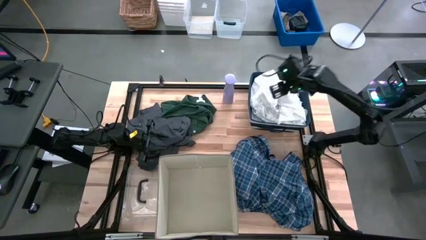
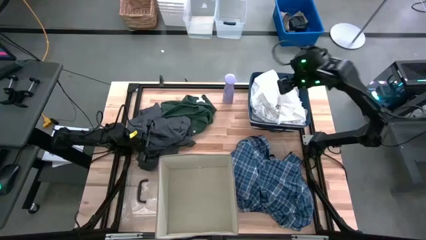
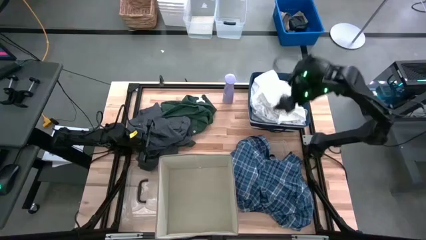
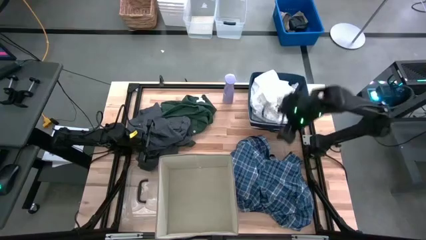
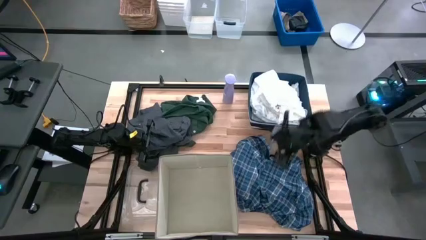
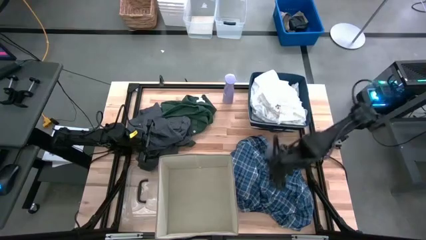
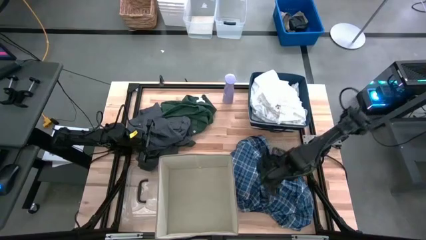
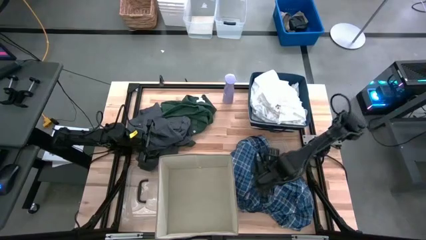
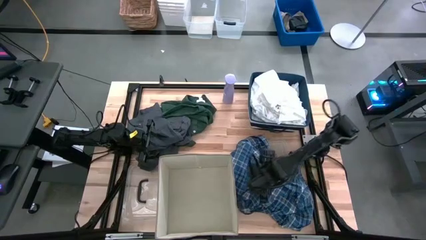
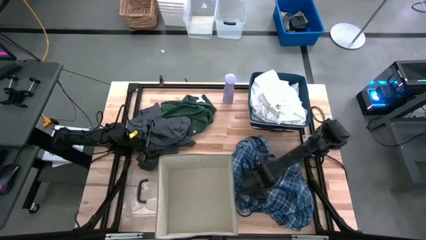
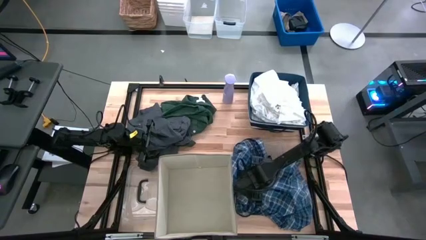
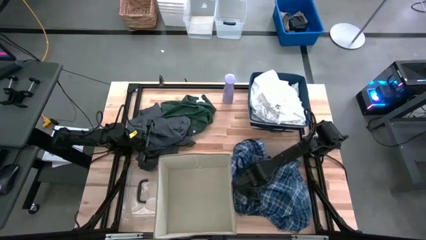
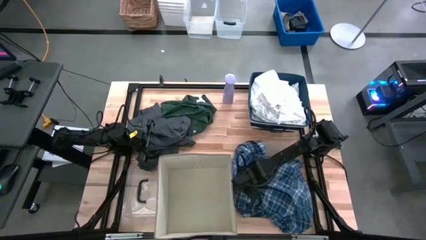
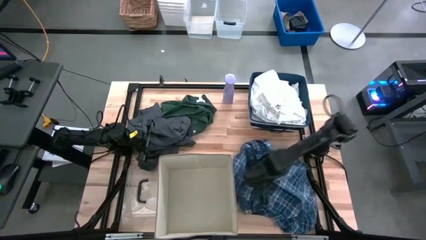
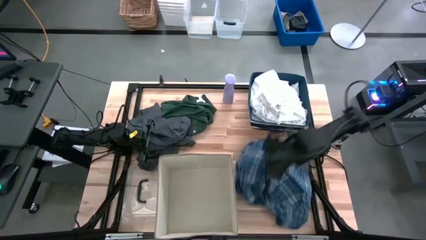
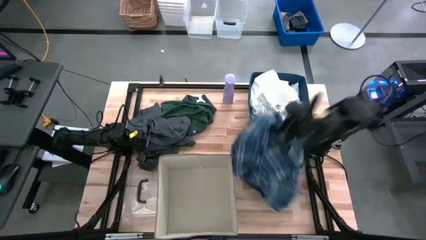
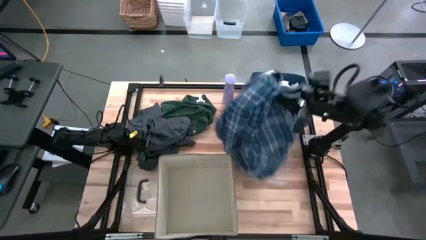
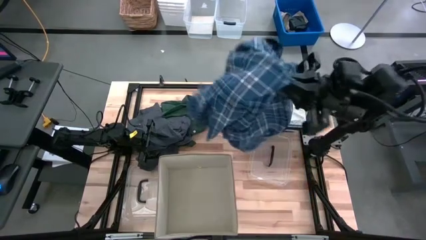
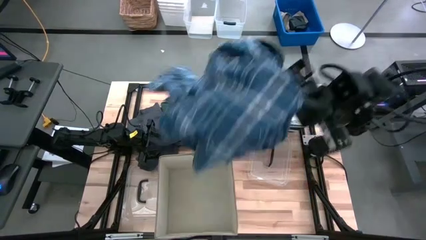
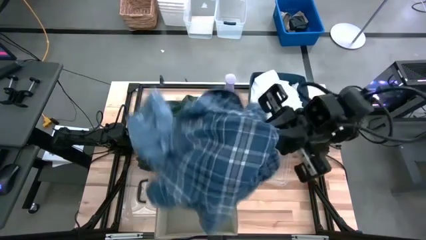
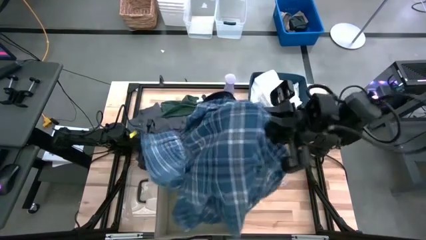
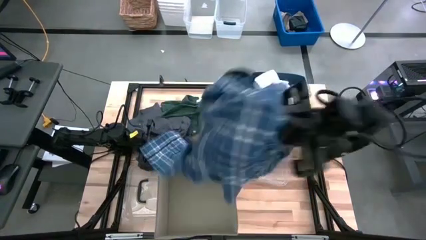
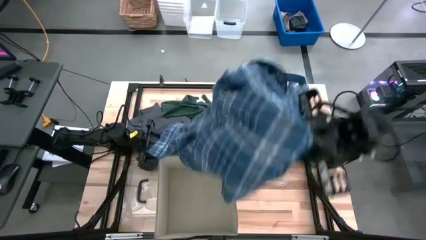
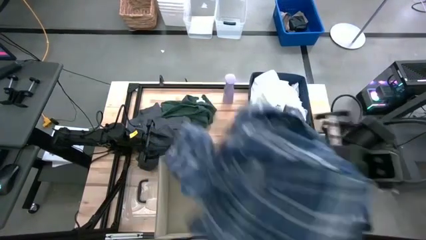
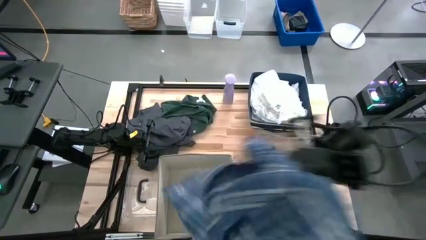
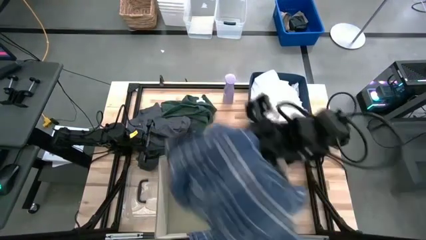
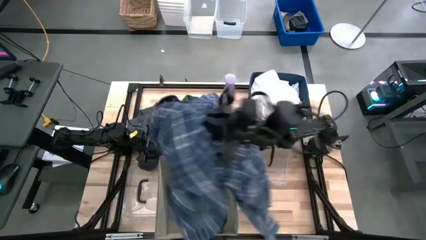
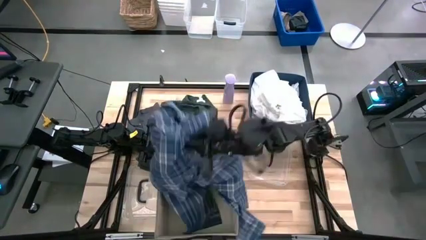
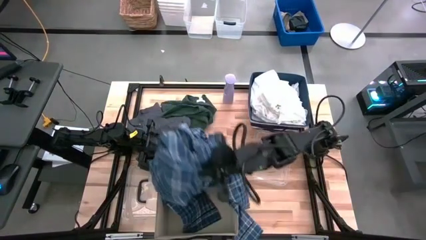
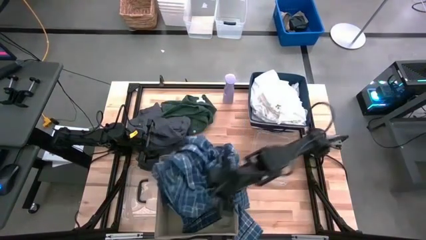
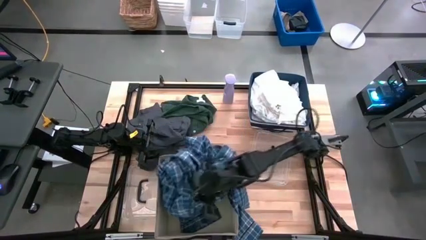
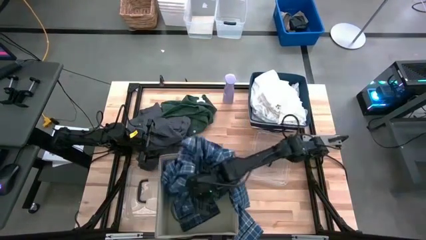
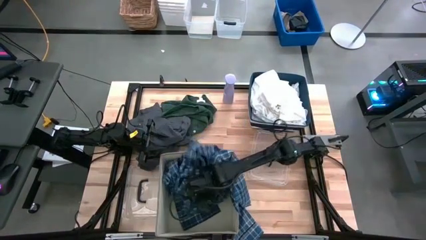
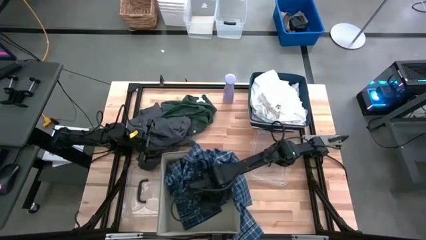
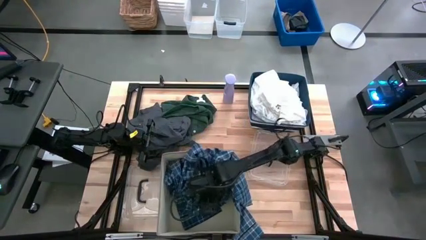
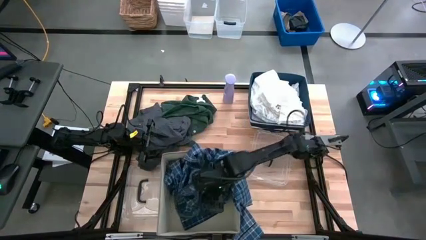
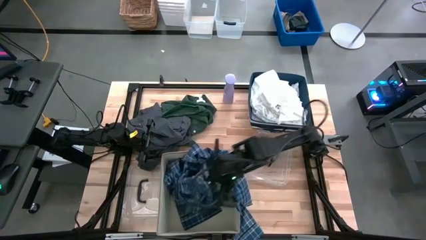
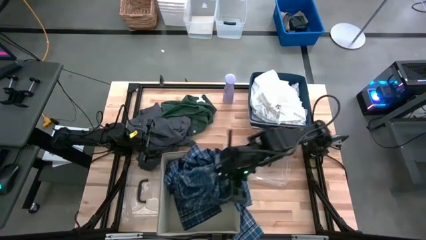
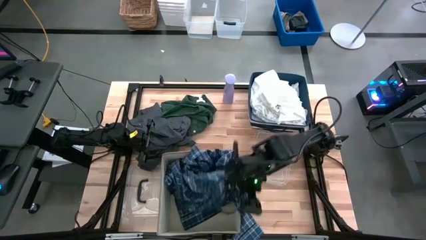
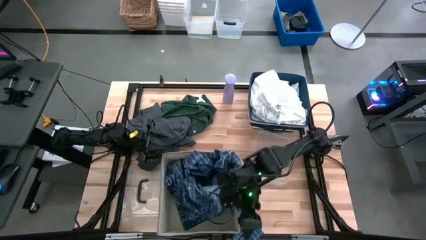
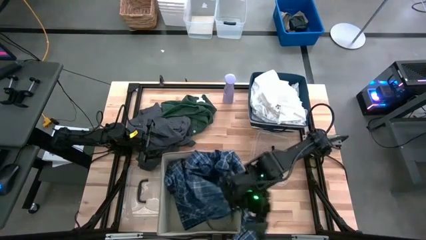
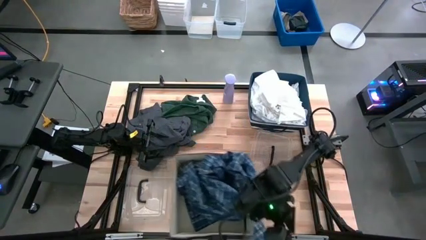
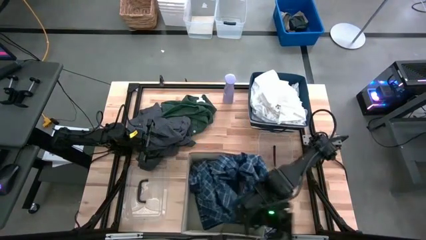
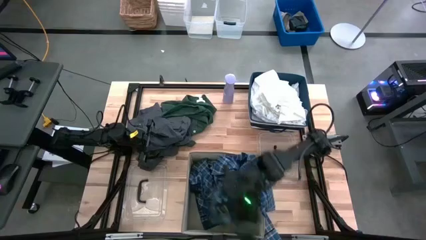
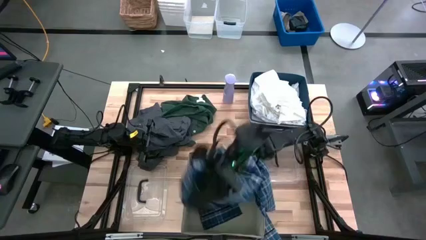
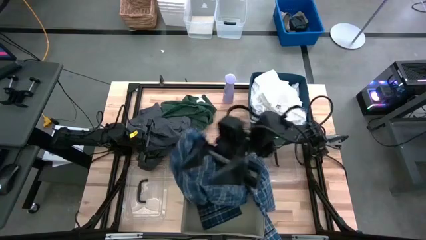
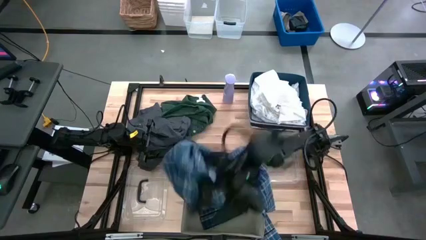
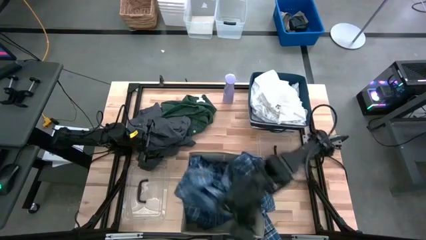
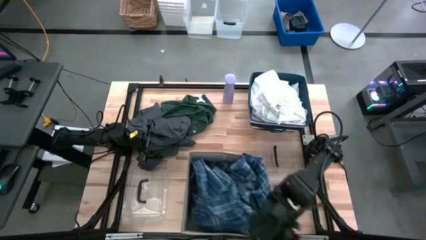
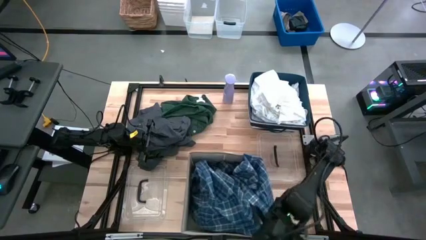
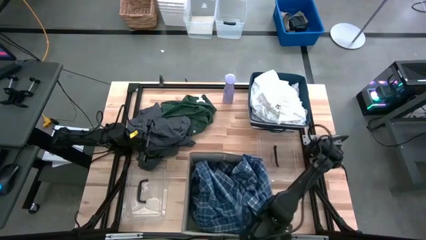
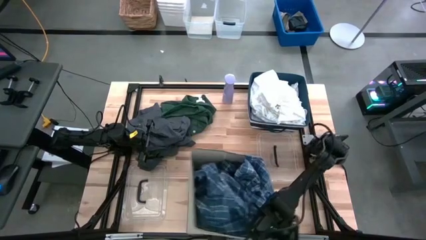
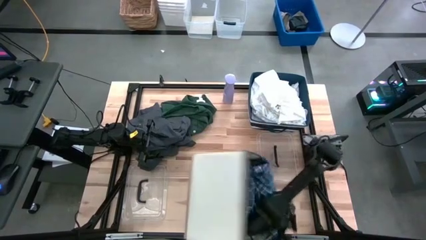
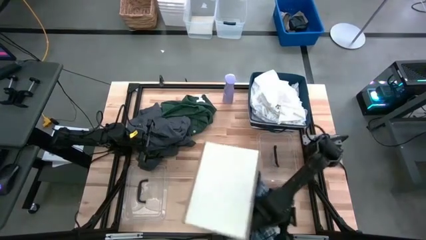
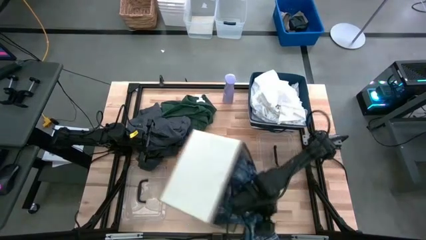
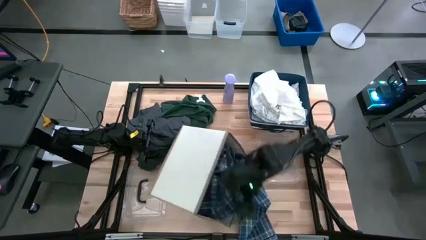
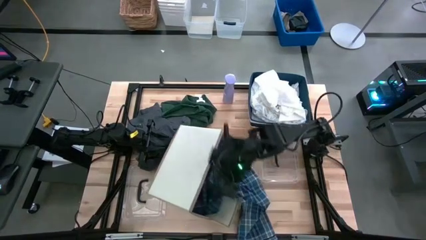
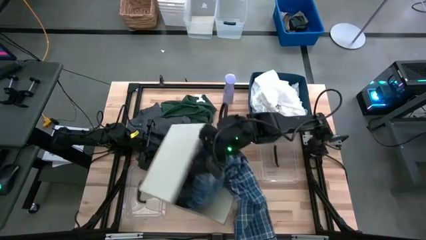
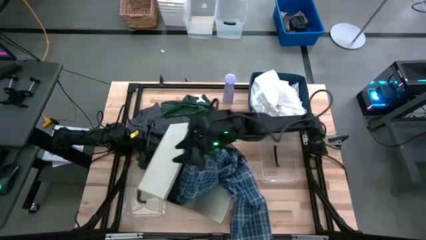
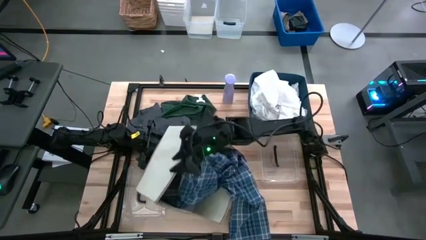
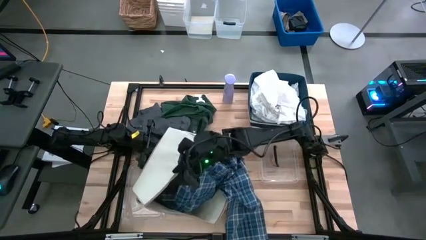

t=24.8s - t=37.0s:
Task: Sort clothes
Put the navy blue striped polo into the laundry organizer
